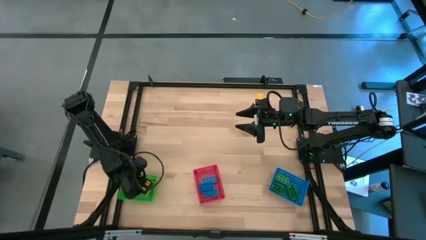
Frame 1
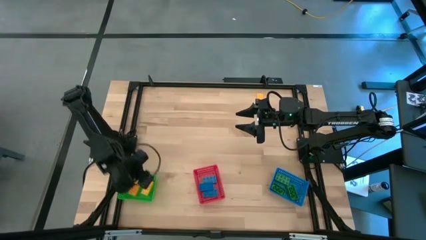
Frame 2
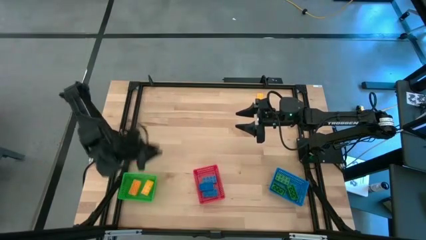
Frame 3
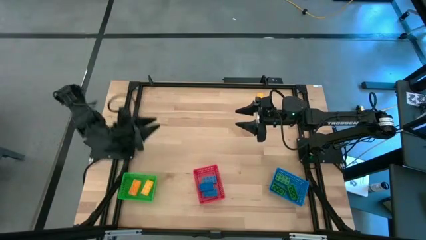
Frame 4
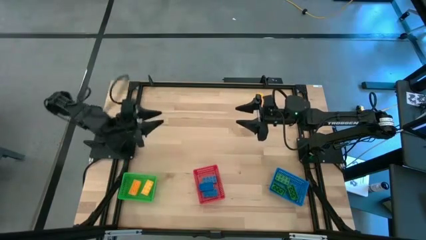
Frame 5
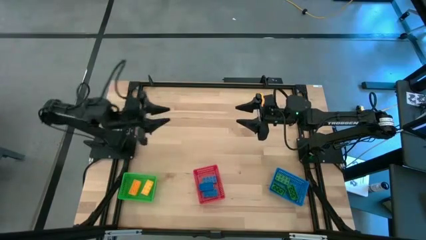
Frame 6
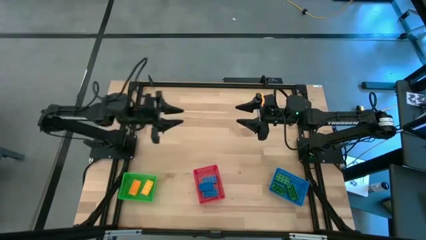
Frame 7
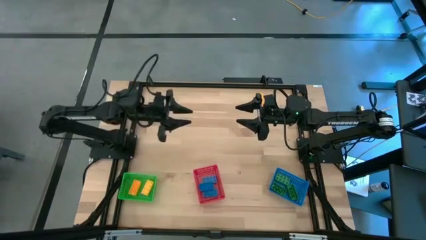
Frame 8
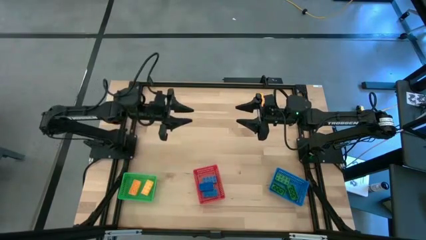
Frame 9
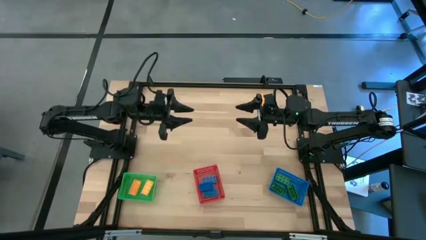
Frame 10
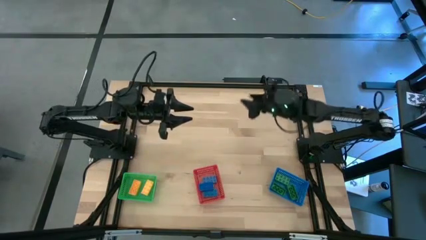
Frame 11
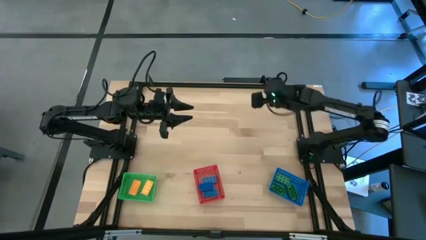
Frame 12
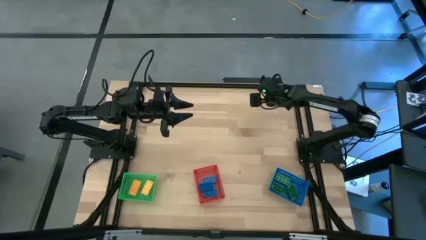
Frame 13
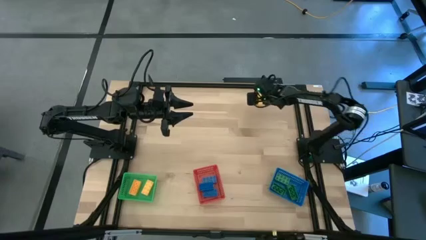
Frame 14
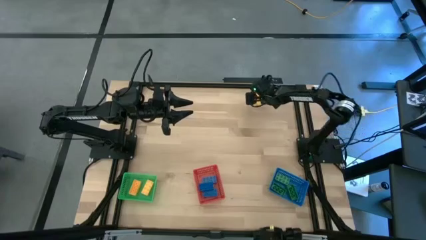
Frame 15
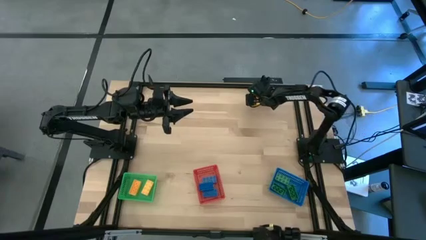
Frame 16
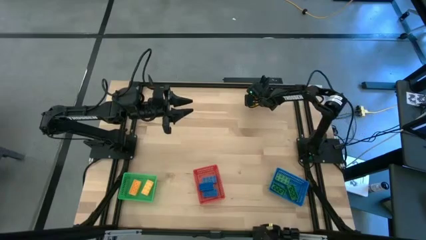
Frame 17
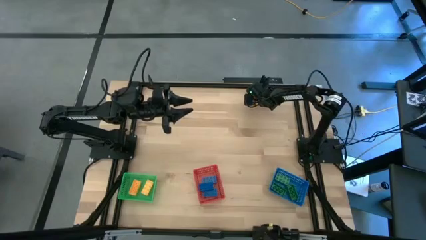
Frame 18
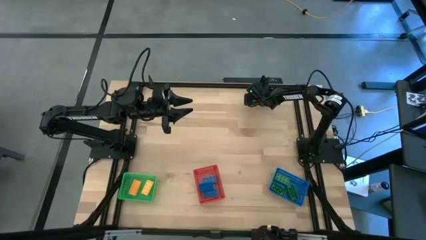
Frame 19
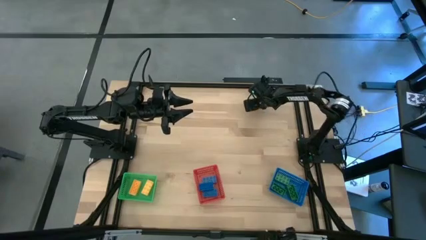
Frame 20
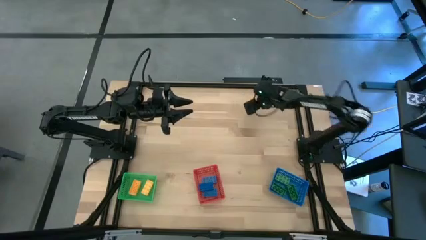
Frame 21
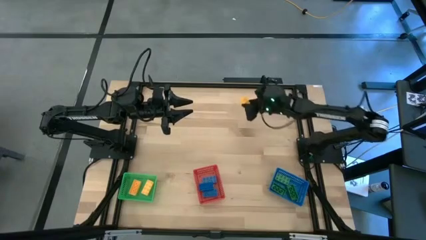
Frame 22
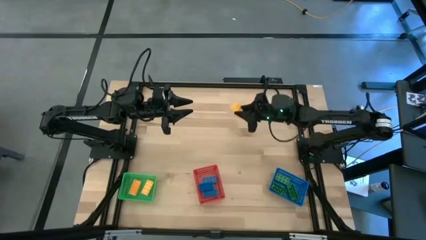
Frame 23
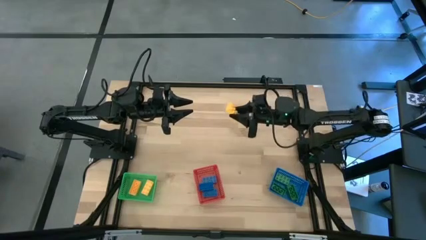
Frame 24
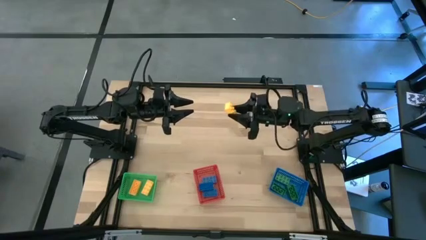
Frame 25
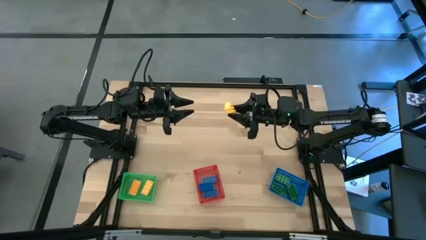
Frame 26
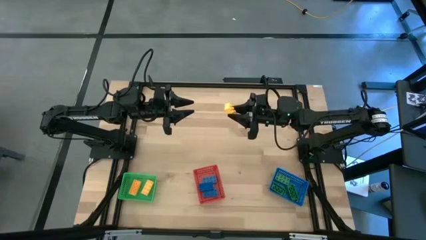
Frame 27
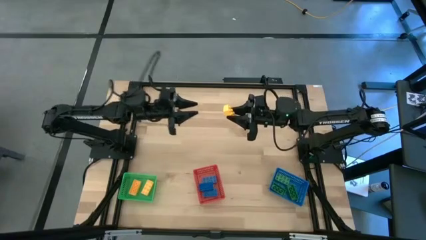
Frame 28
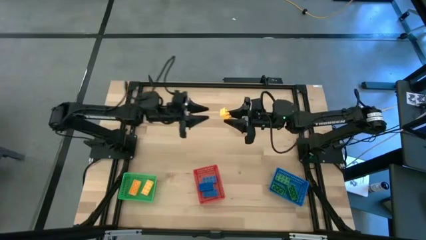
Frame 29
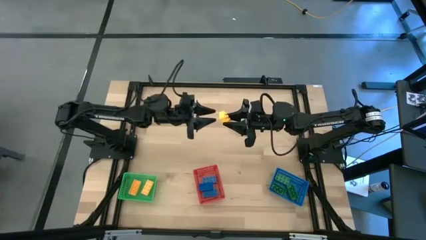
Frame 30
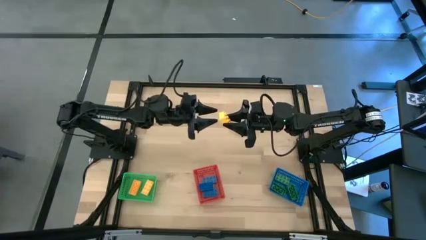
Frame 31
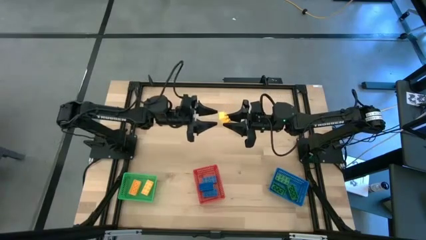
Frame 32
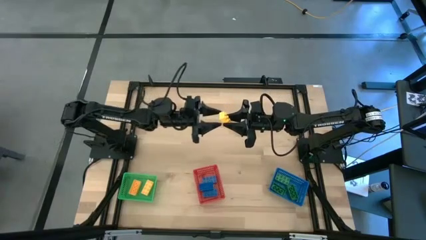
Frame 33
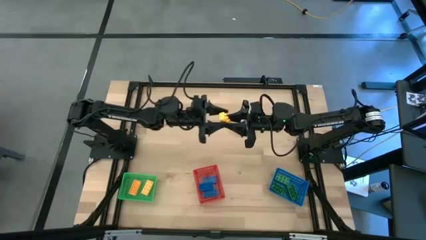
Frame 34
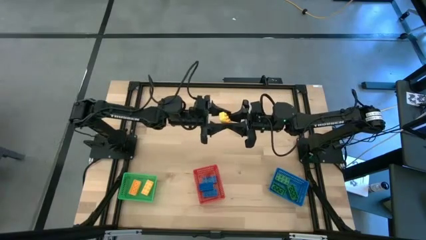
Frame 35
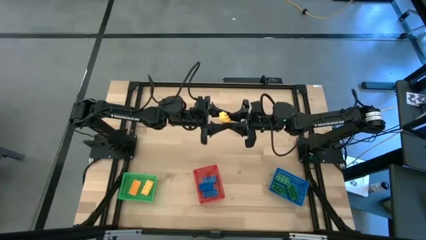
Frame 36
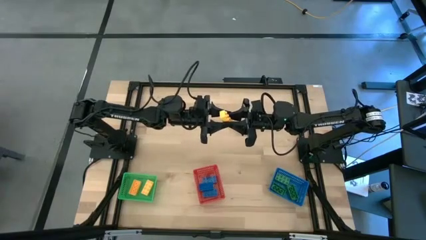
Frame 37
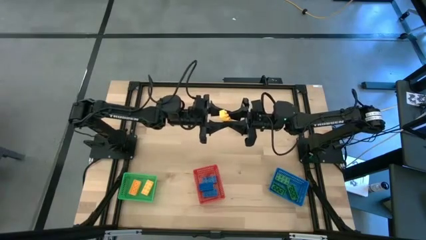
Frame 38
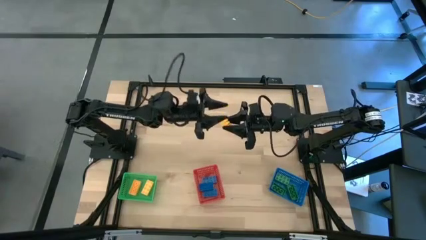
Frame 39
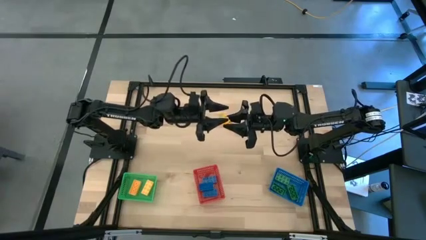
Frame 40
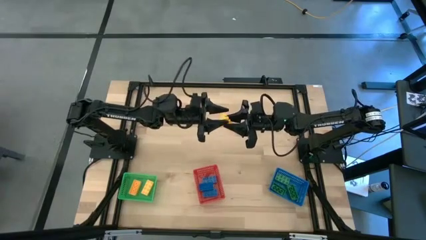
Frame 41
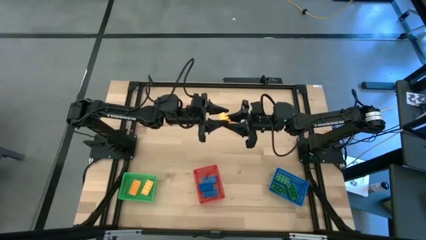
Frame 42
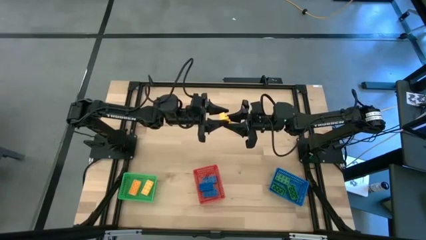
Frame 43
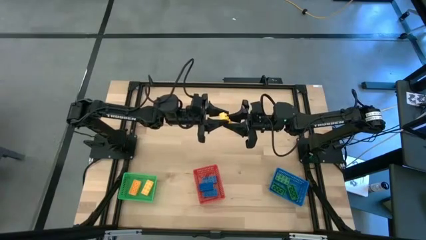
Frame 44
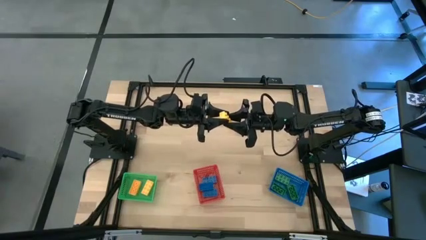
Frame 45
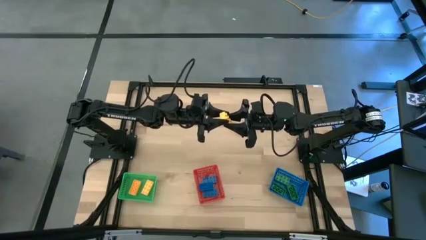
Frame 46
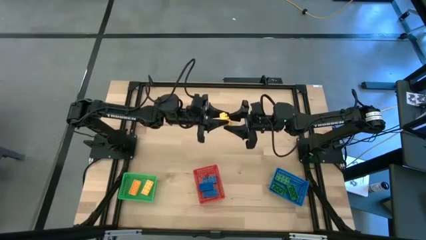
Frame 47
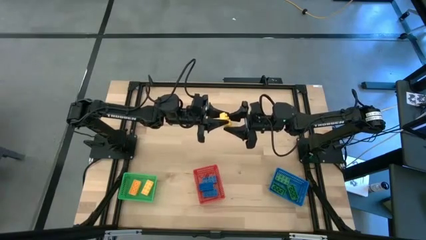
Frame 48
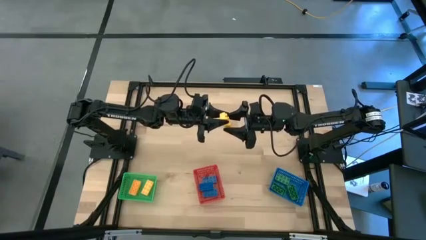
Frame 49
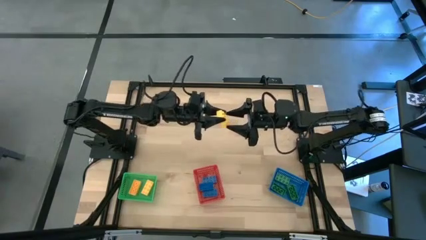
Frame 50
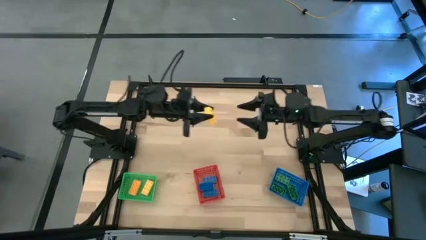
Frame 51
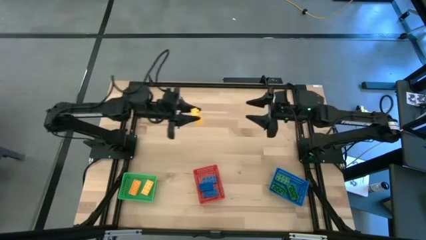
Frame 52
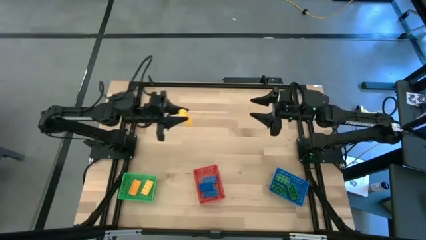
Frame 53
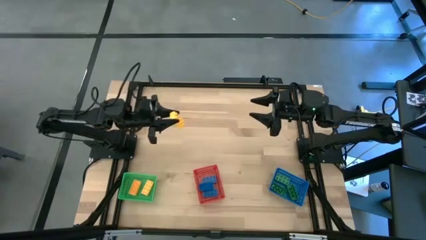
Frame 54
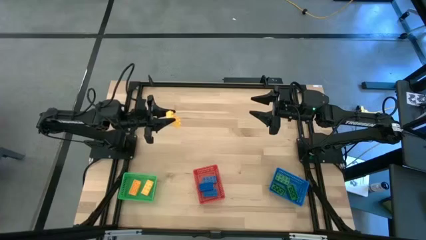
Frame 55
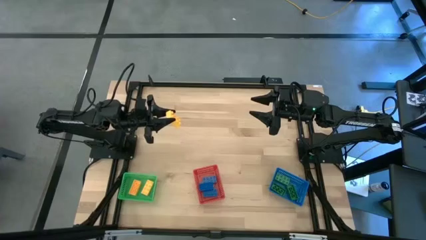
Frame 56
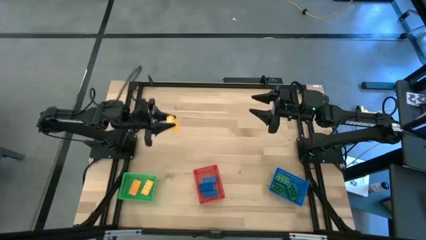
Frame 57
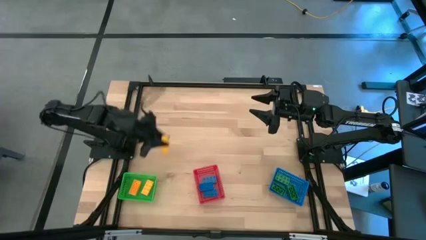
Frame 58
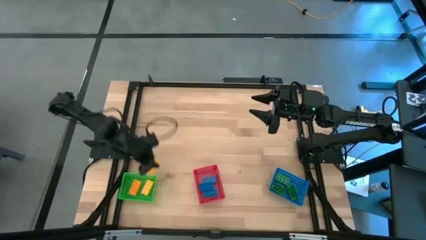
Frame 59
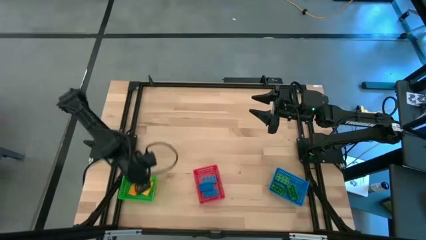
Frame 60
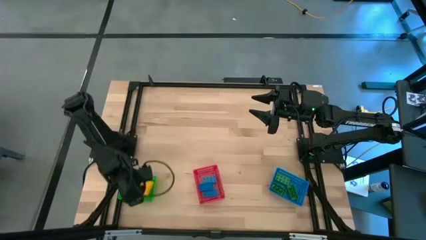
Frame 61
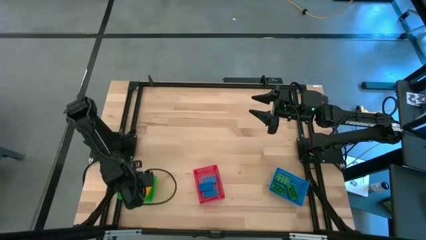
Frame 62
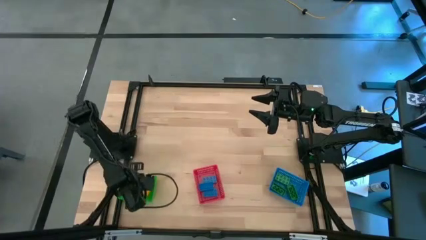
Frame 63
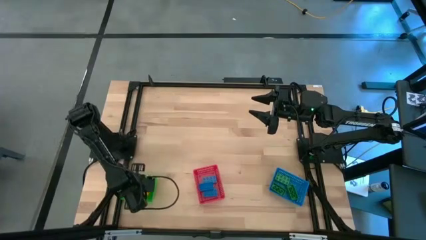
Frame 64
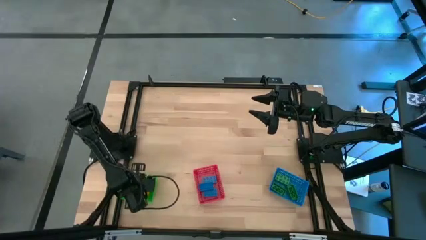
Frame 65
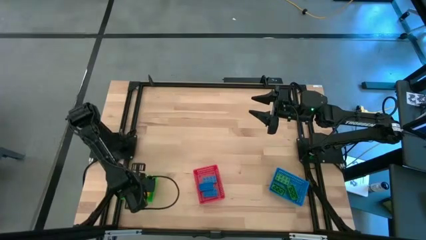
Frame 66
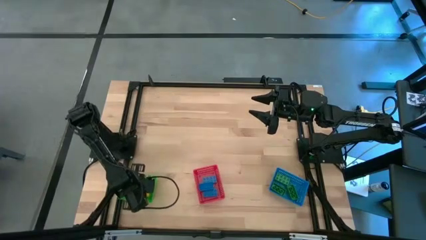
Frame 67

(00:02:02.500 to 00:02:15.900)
Task: Sort & place blocks by color
Put the yellow game piece into the green bin
